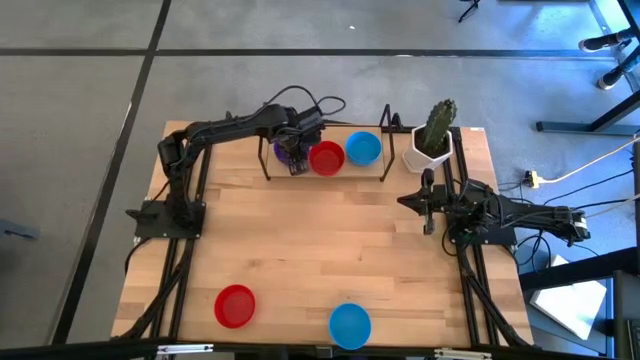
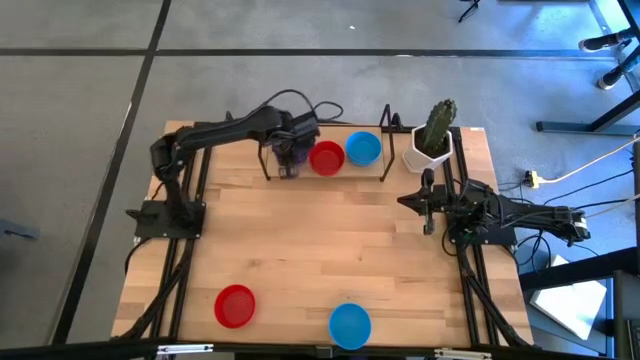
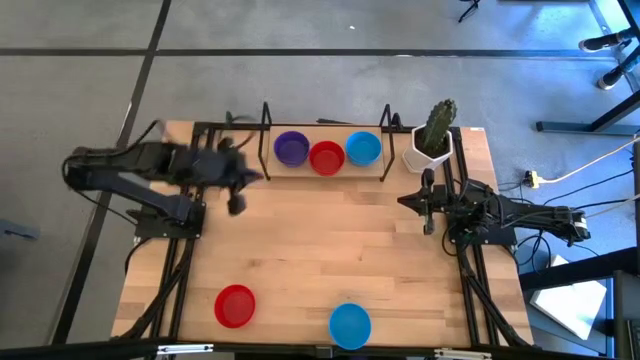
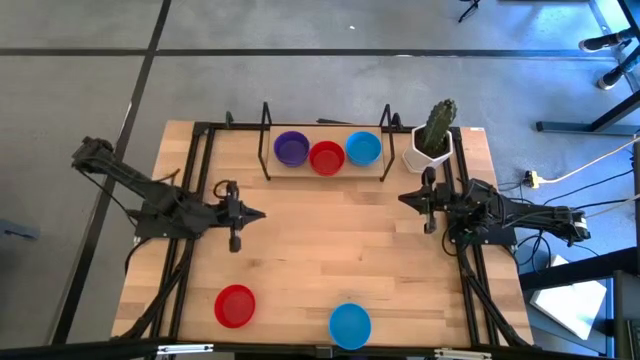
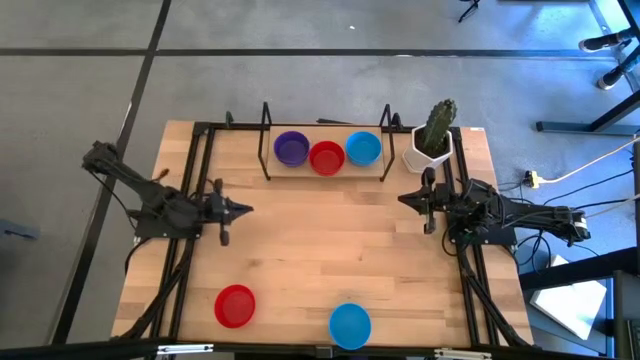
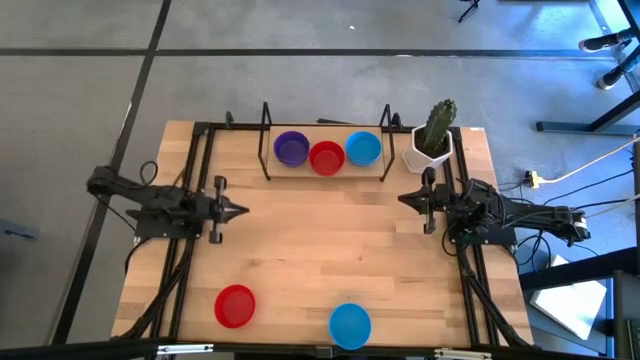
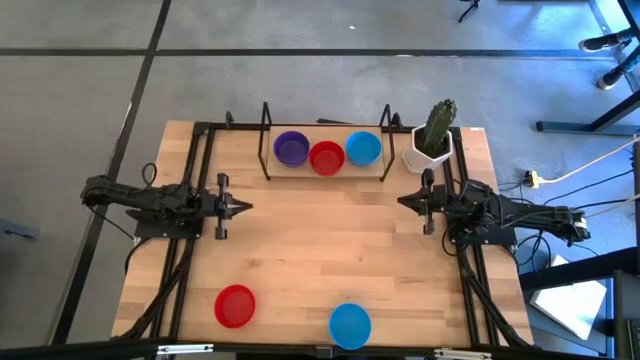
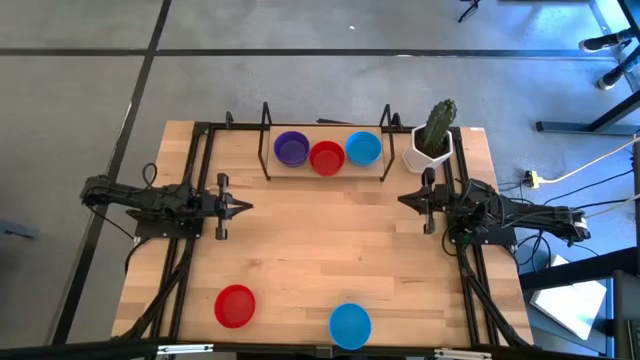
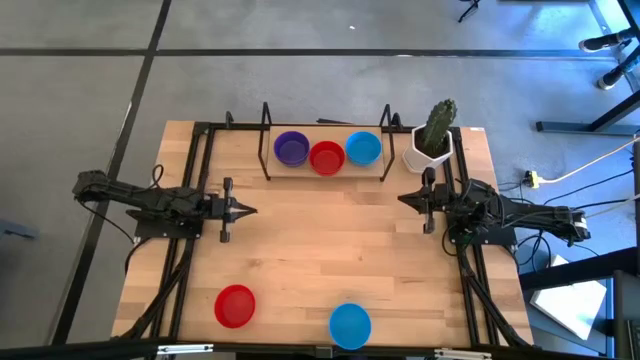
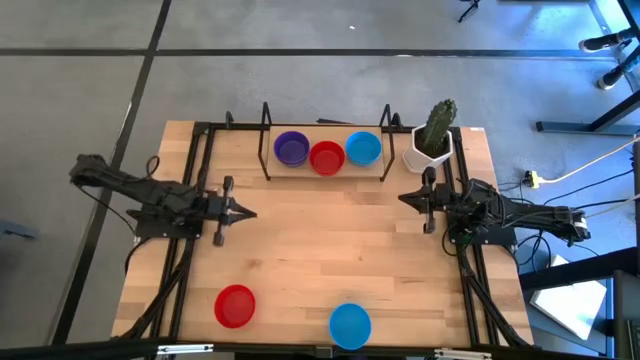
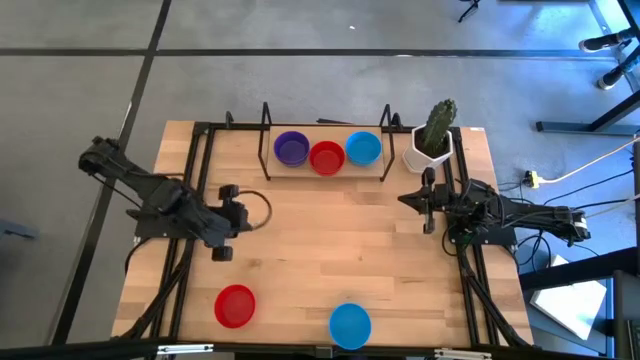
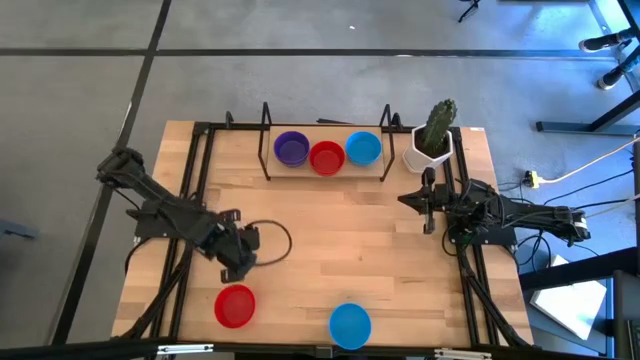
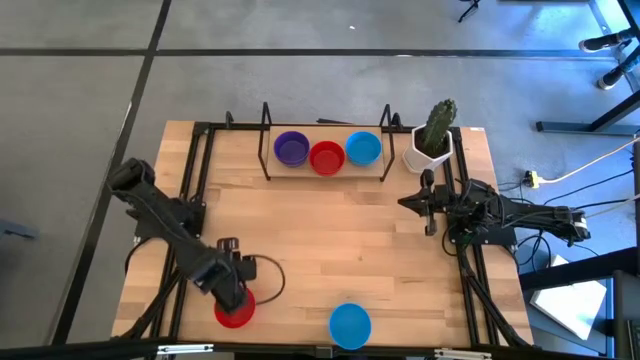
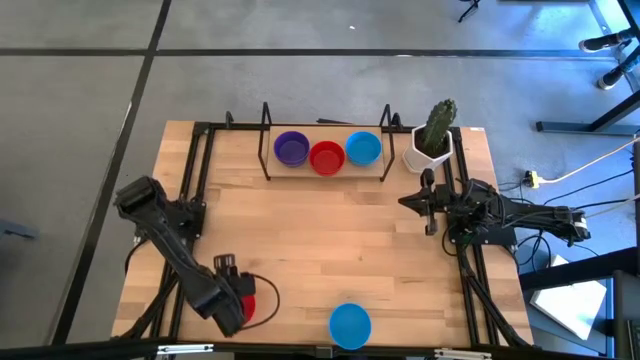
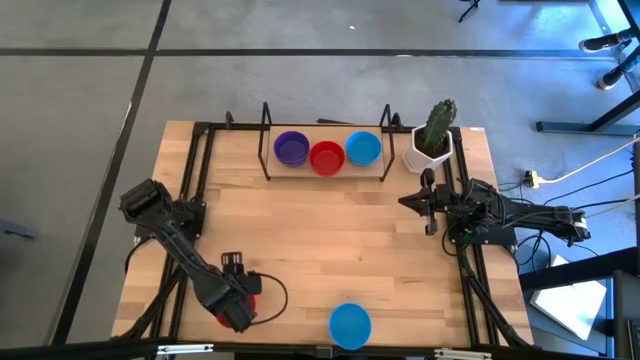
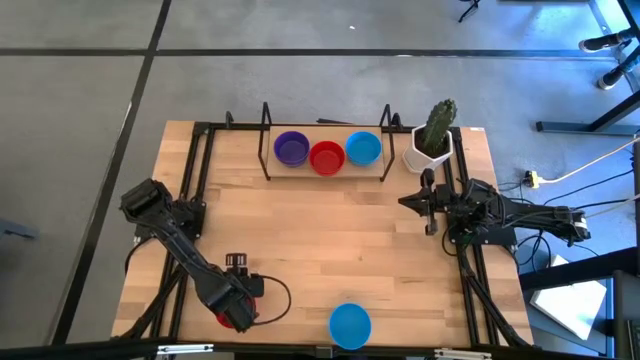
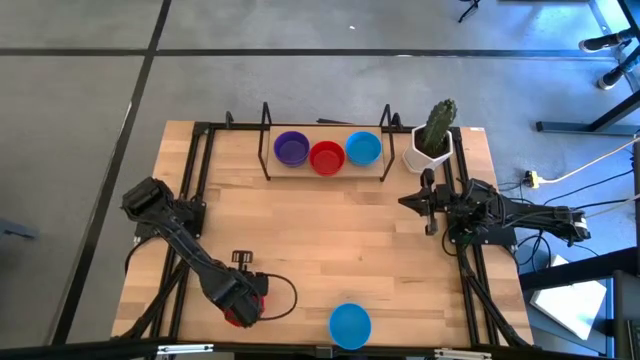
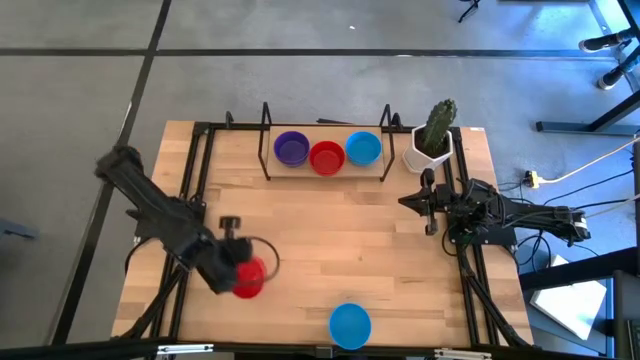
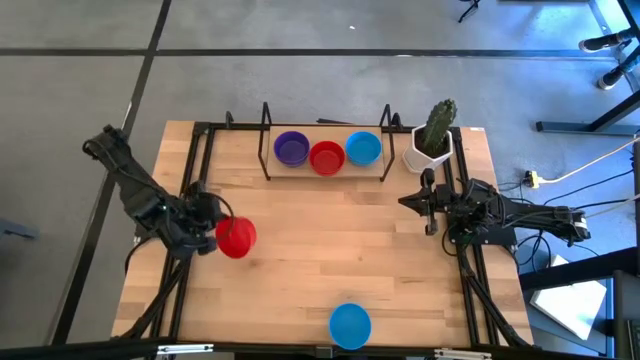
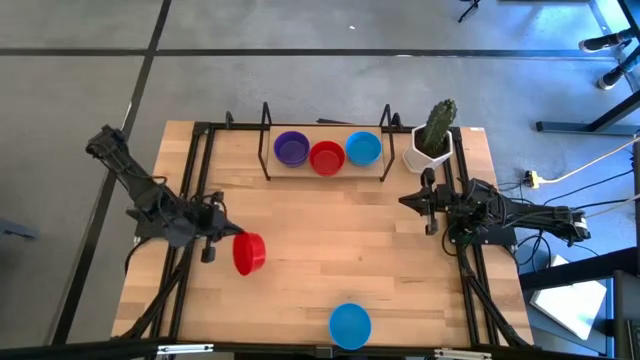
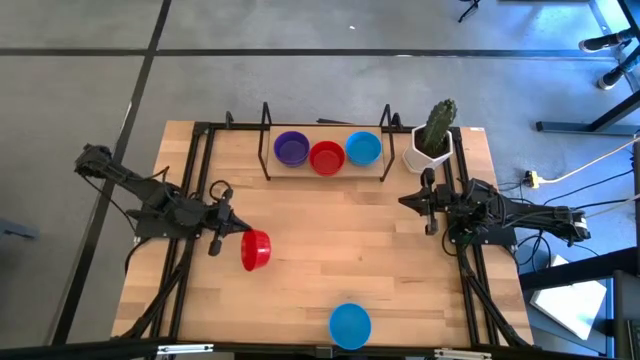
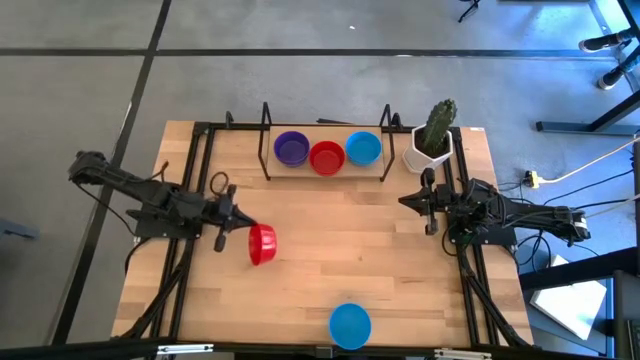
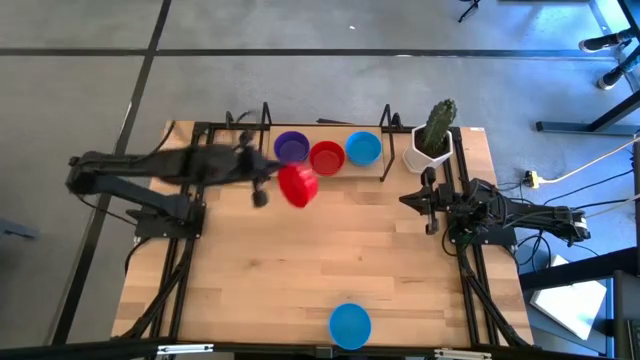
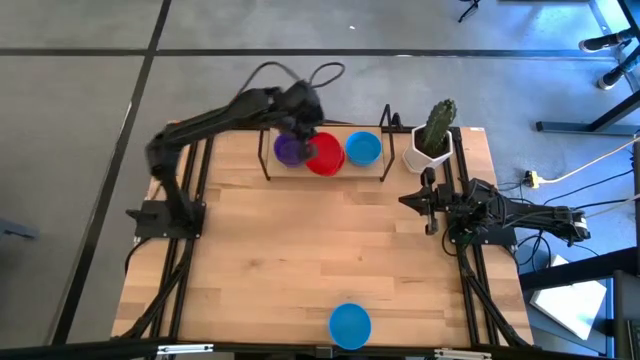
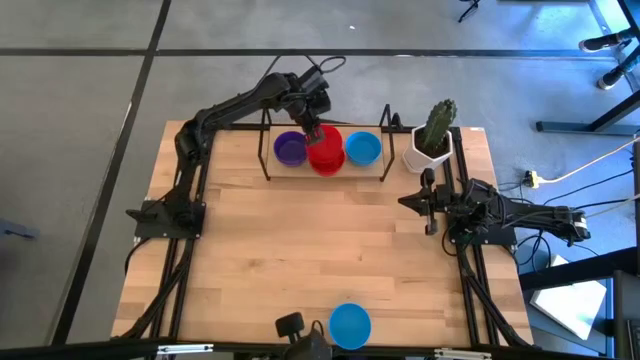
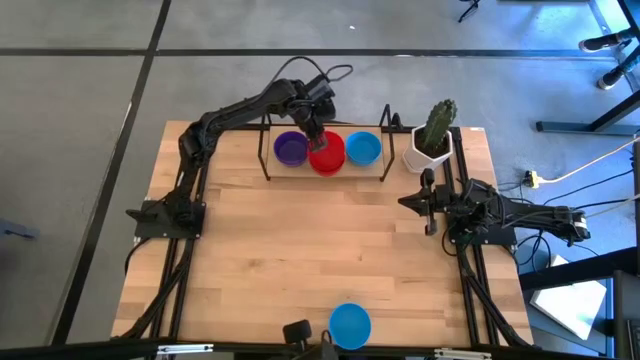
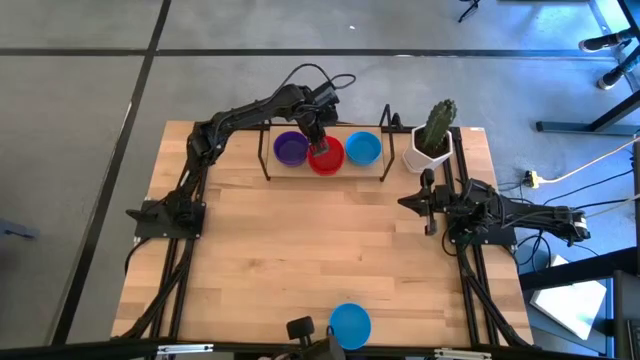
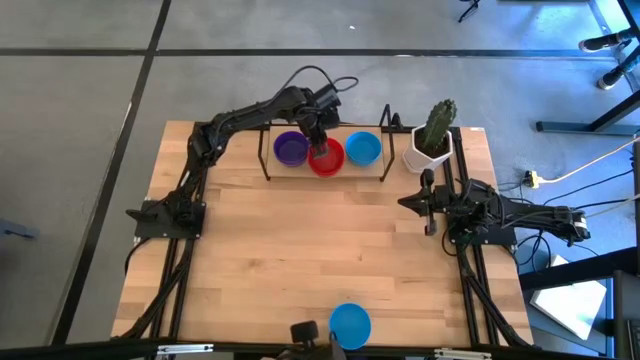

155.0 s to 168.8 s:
Task: Pick & Place Mini bowls
Stack the red bowl on top of the red bowl on the shelf

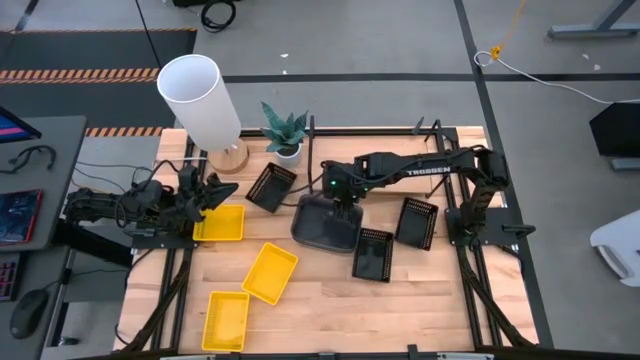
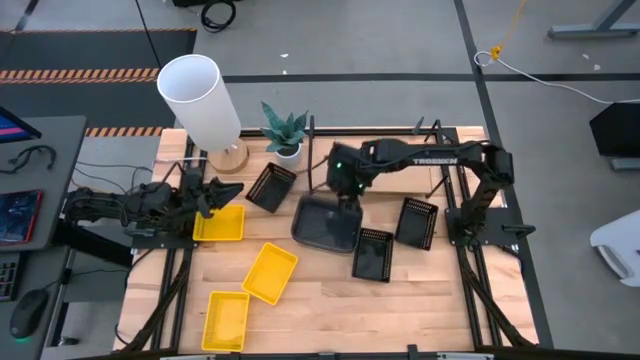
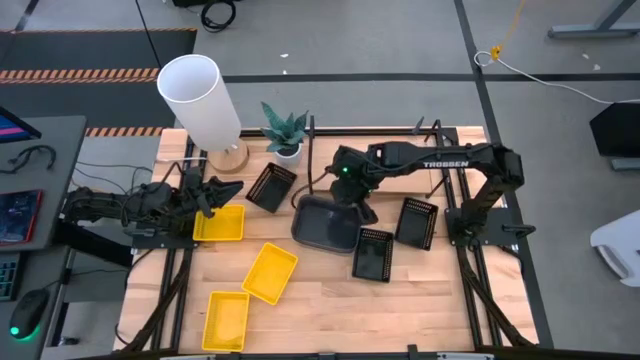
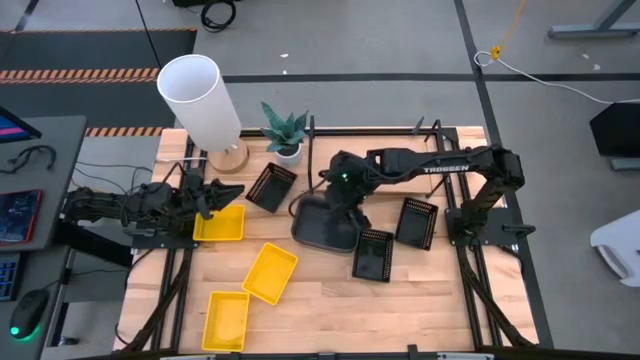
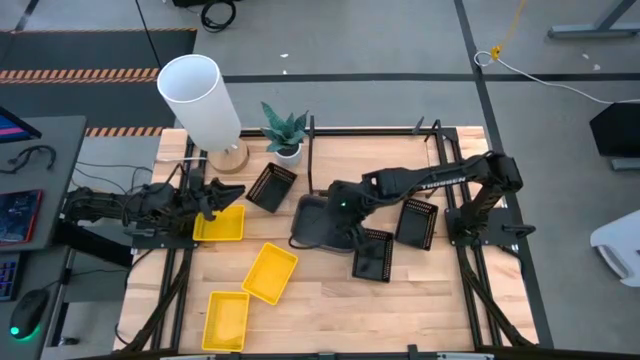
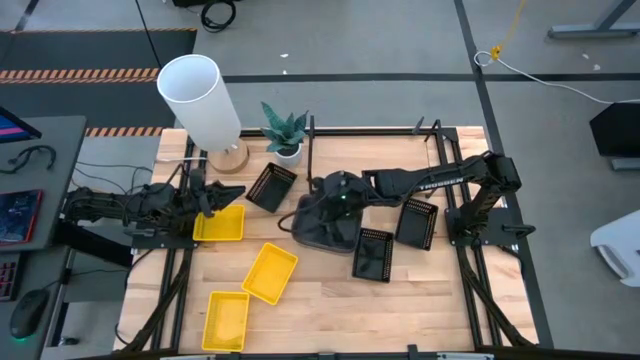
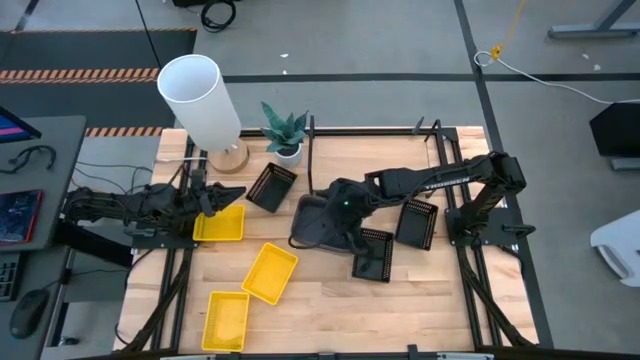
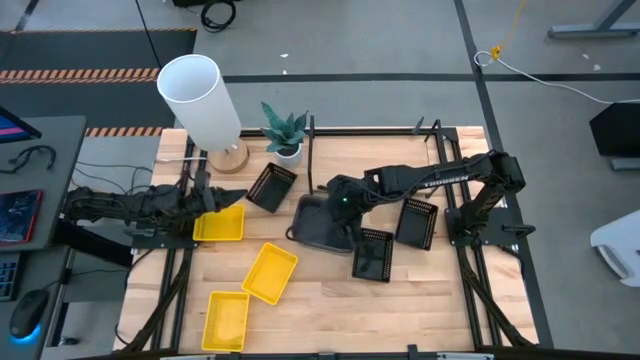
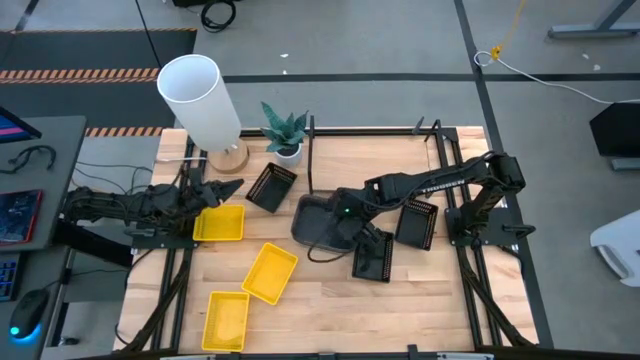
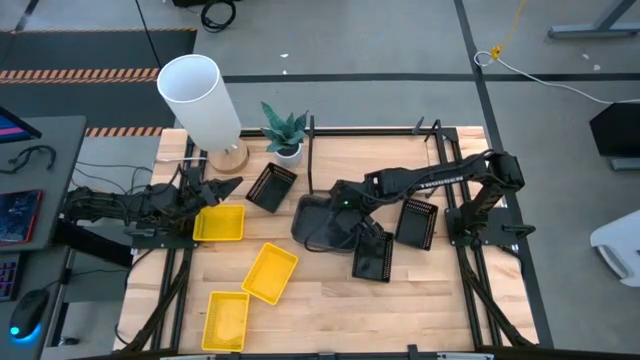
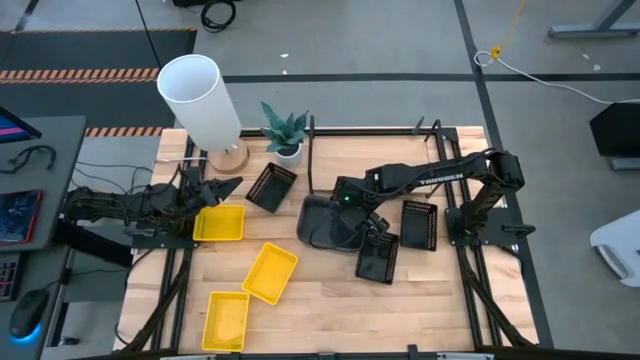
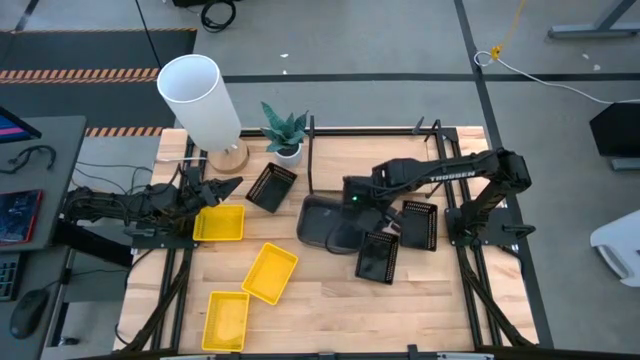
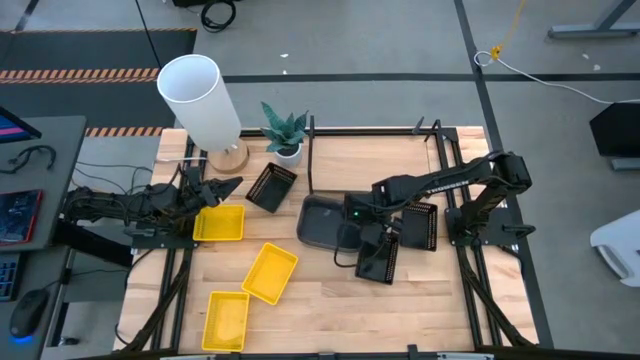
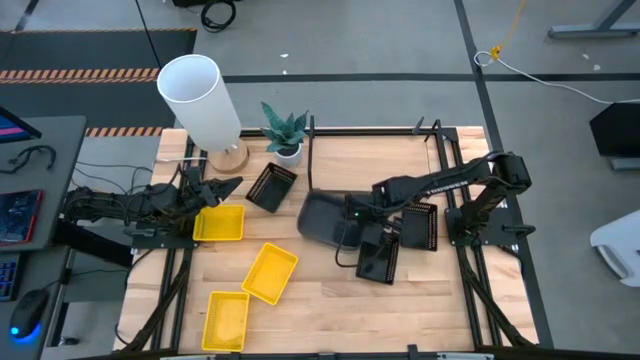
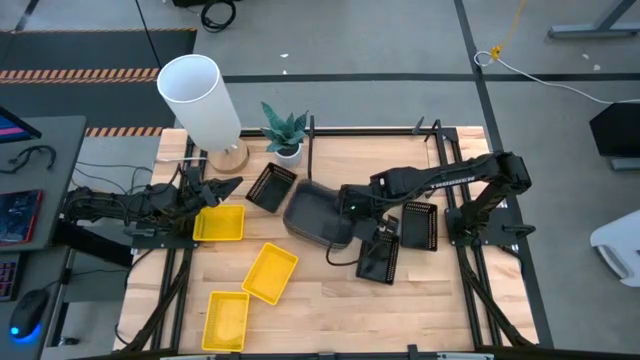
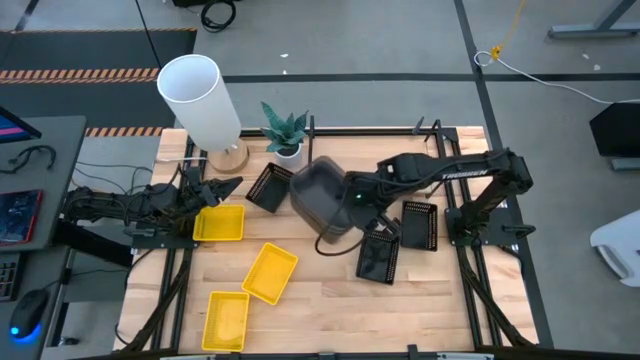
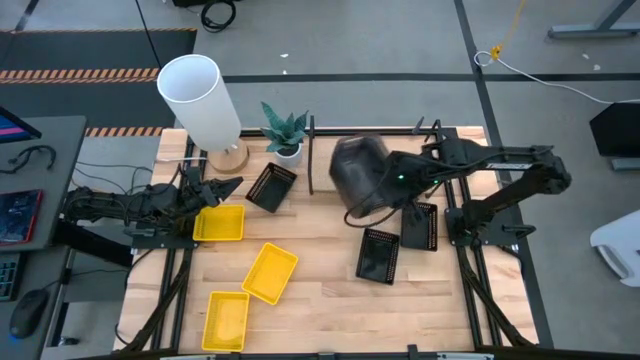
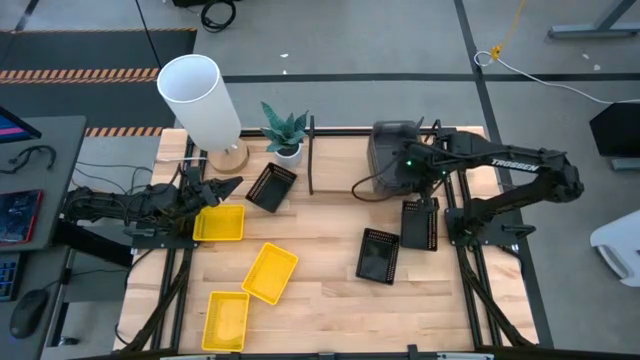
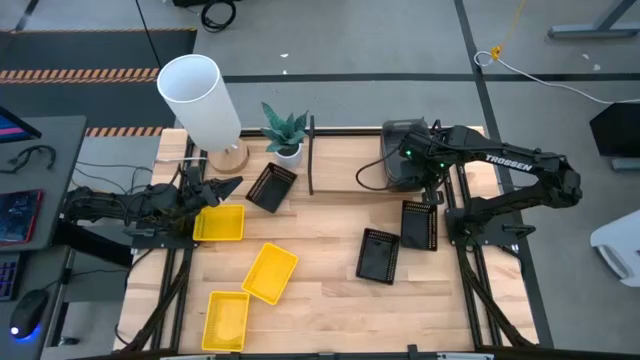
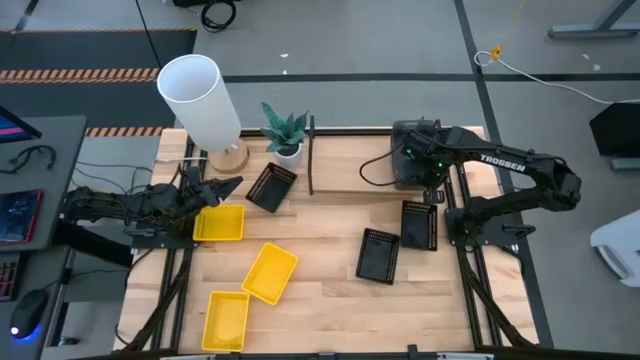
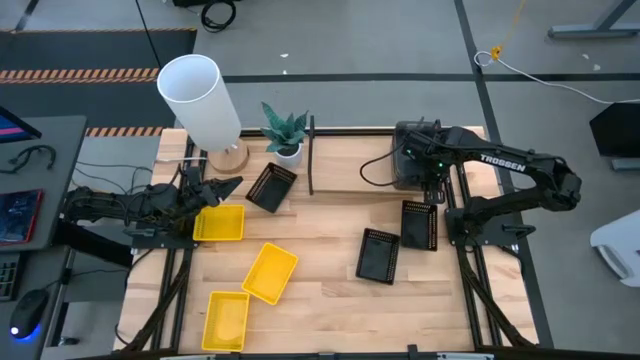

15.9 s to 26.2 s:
Task: Stack baskets on shelf by color
Put the stacked gray bins on the shelf
